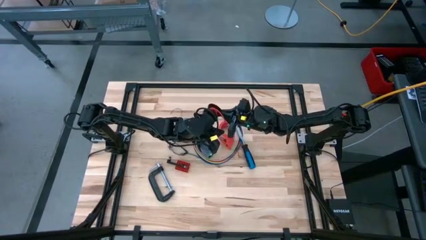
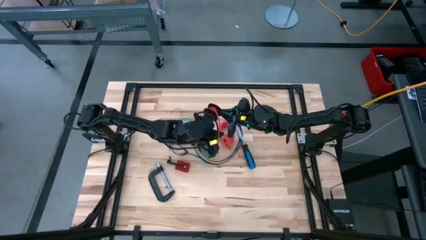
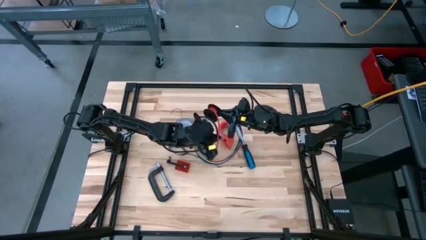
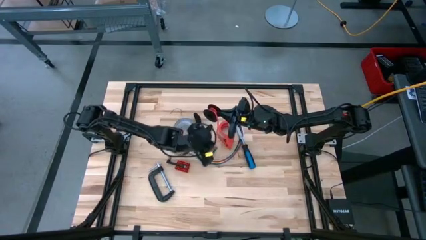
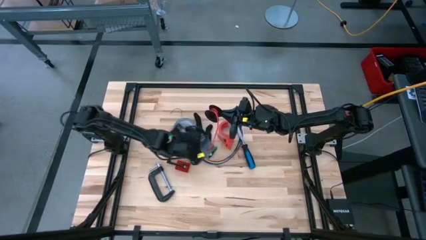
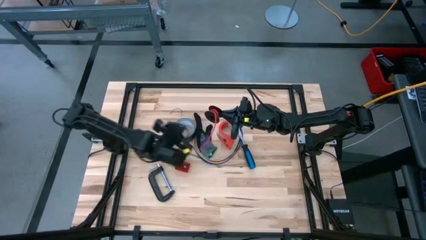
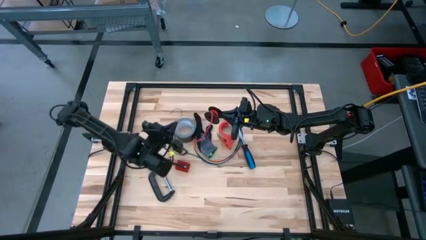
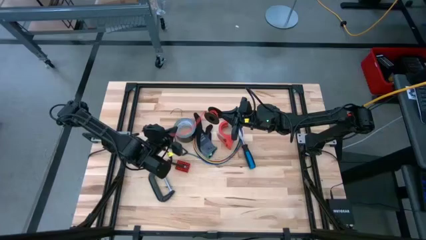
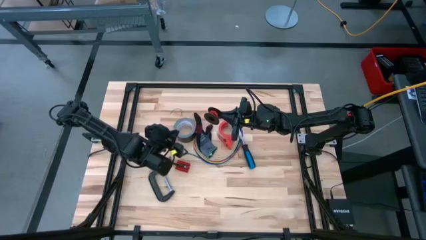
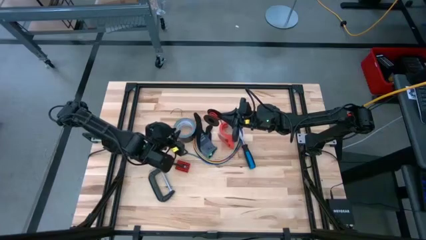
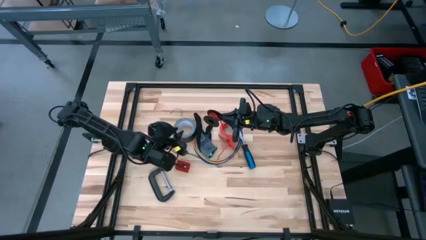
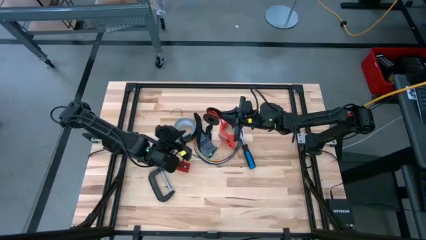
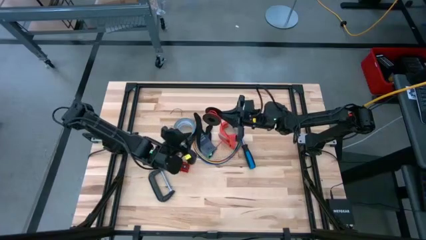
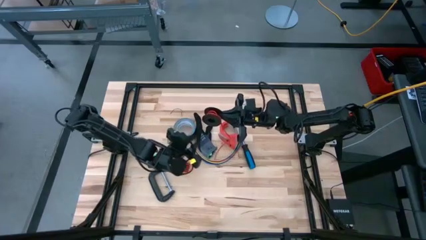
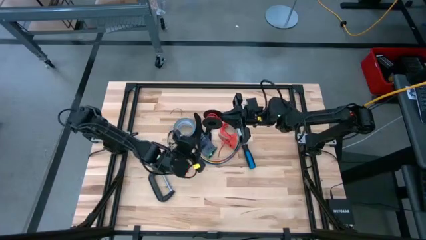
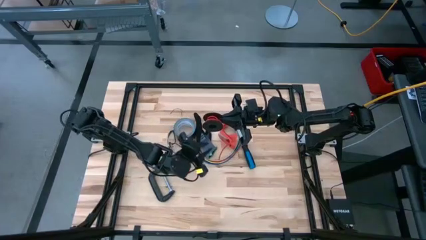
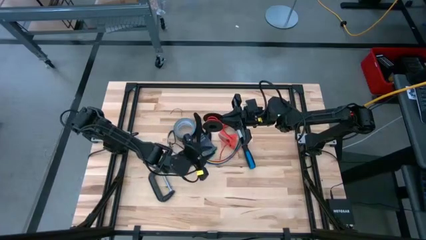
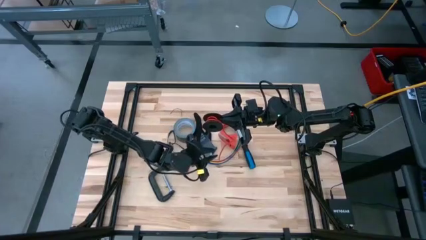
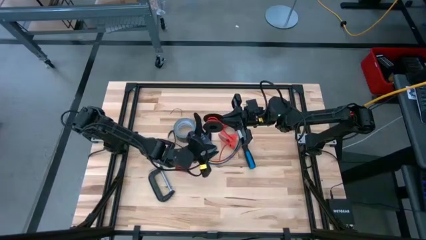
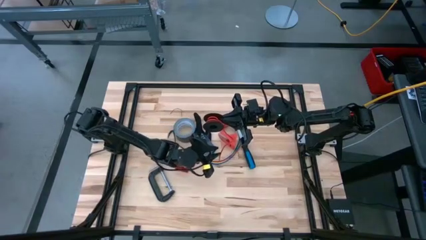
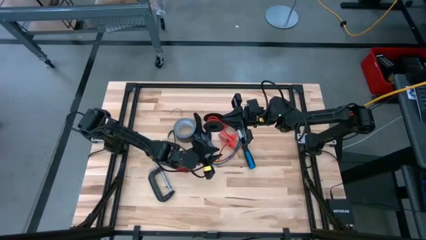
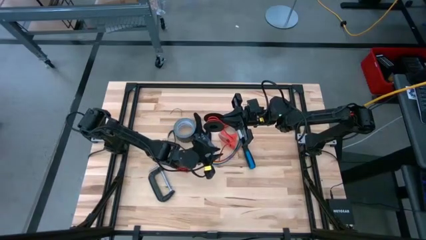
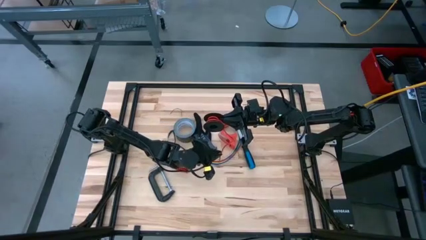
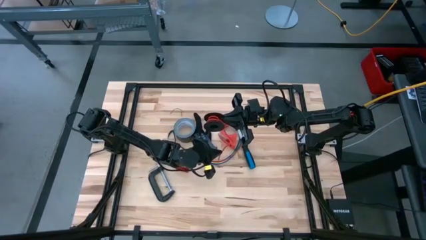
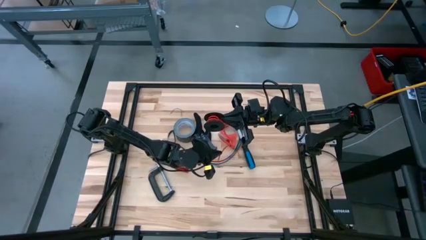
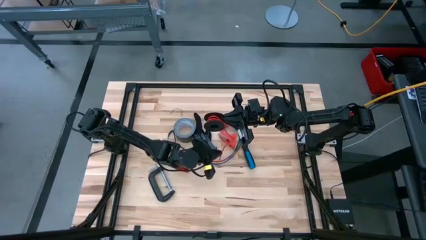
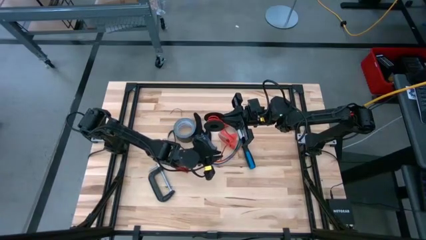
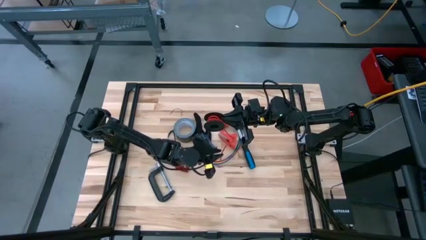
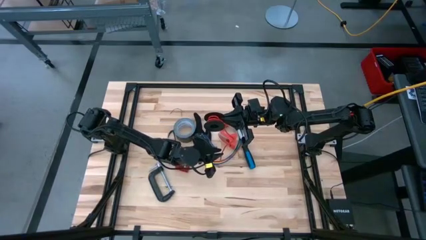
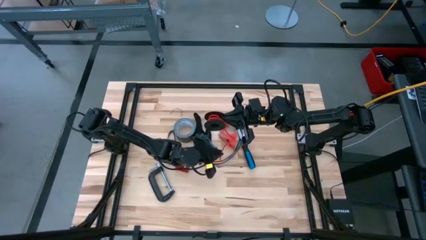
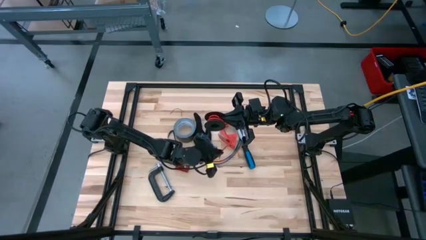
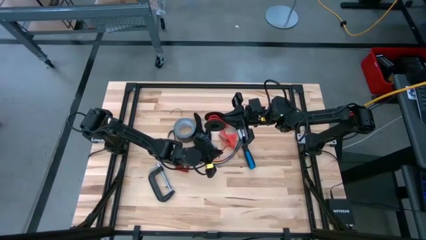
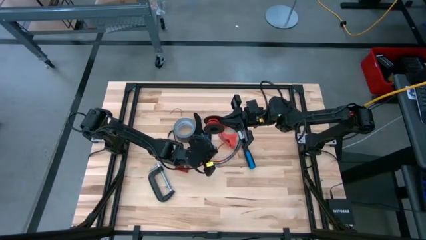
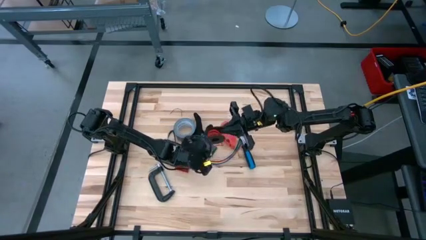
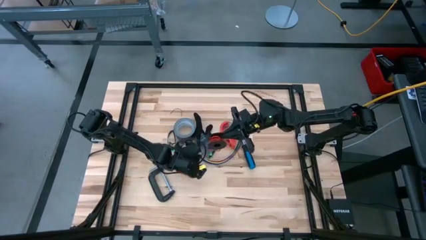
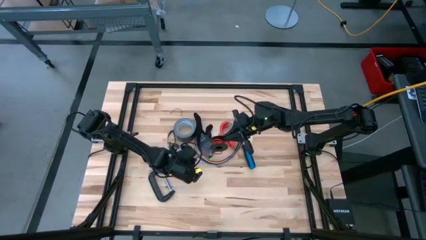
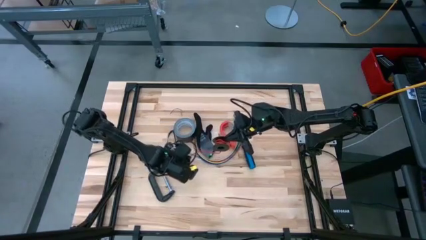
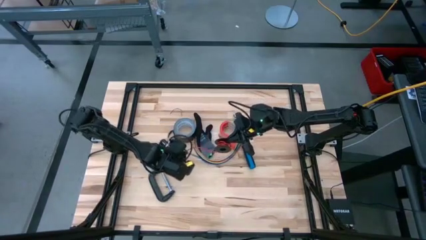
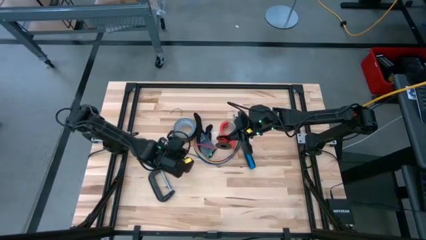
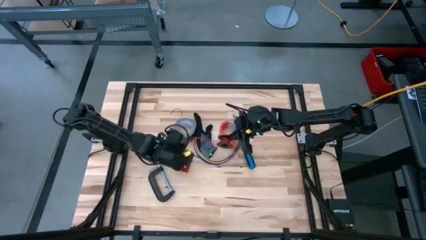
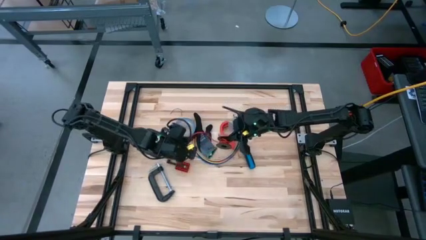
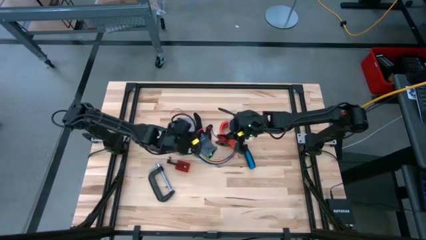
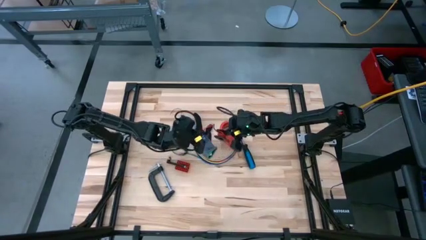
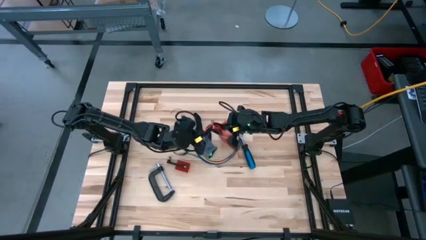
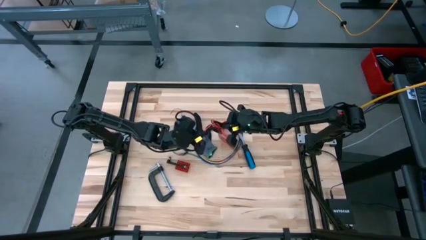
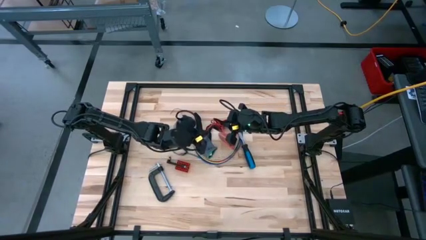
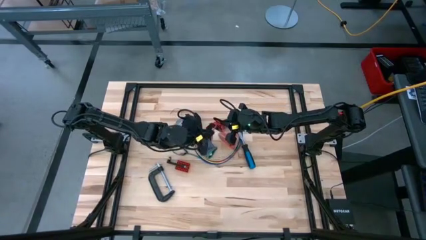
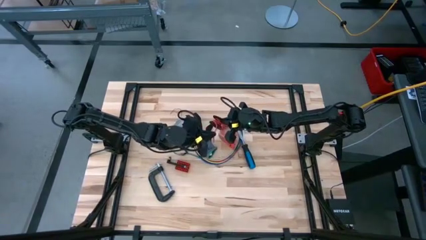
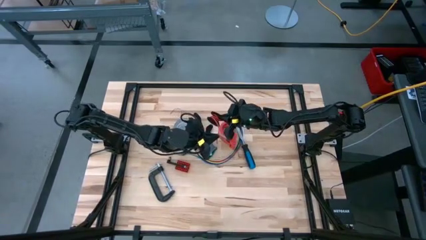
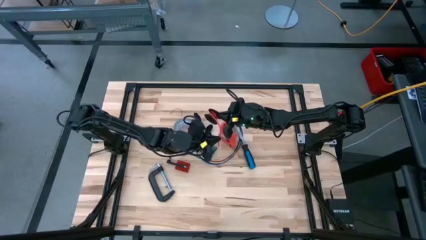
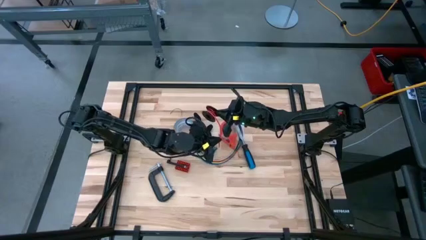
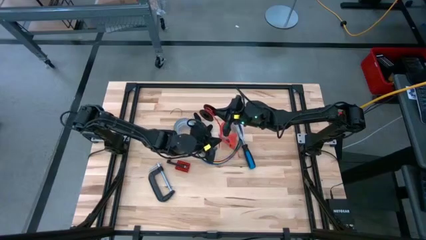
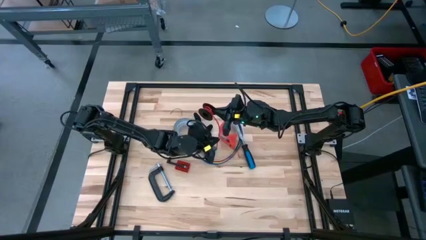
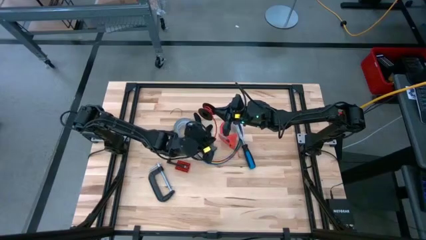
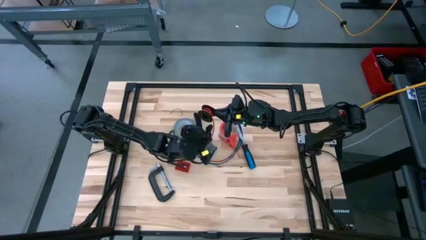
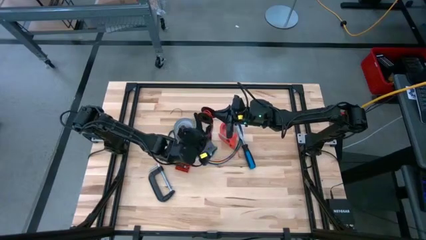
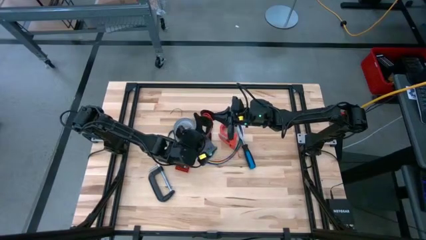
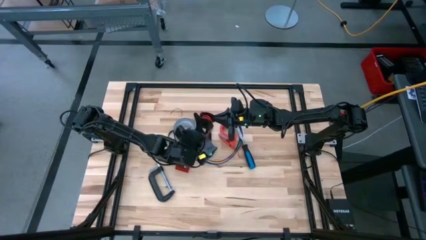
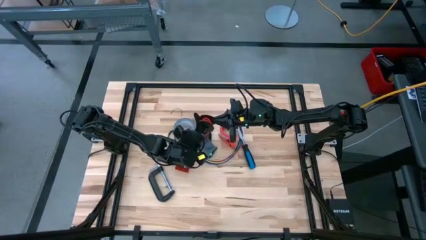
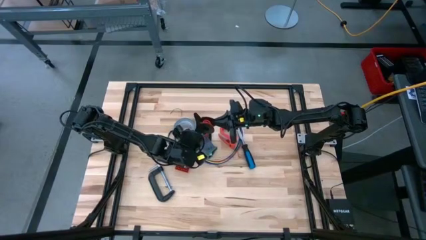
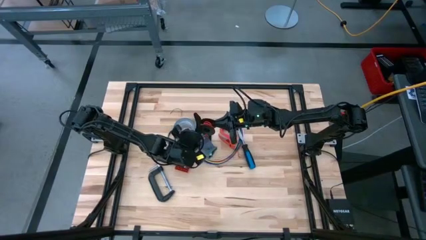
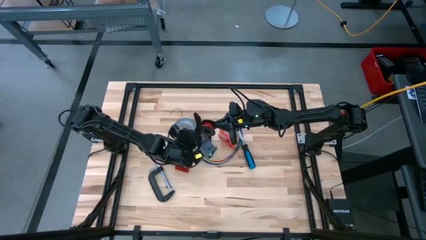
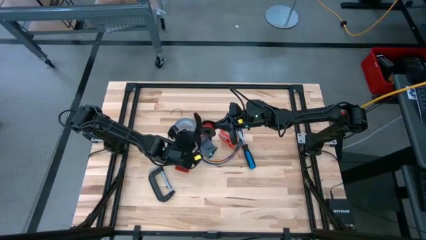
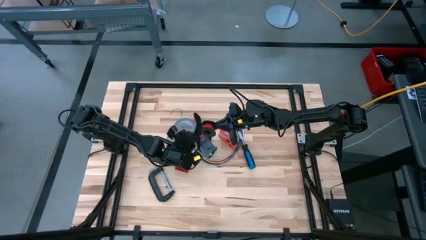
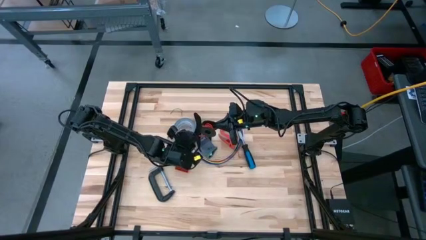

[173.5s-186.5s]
Task: Coil cords
Coil the red wire cable onto the black spool

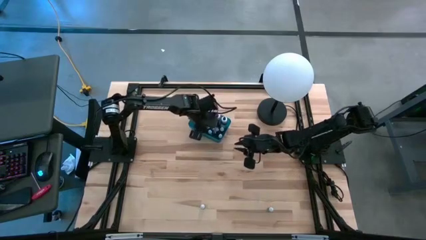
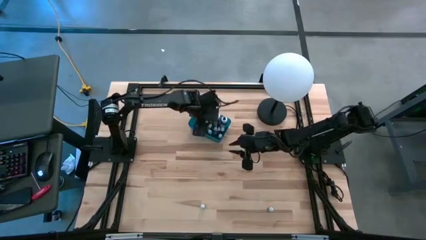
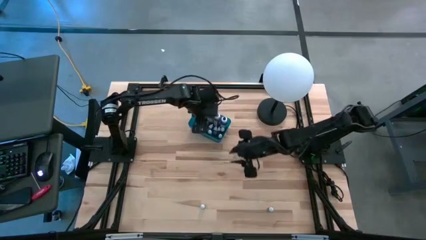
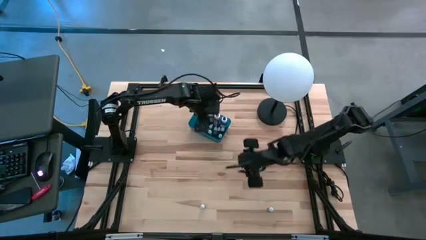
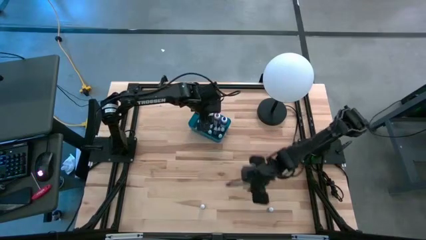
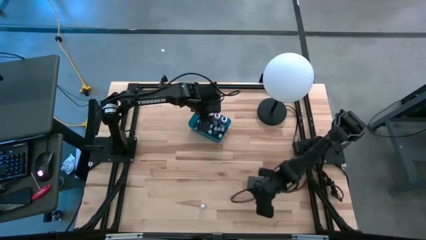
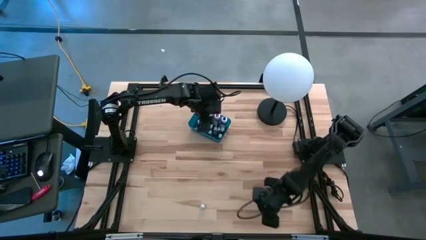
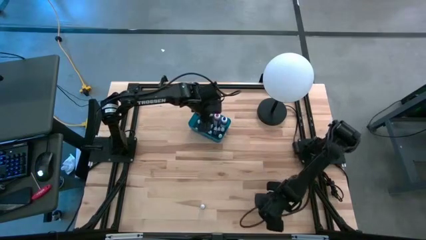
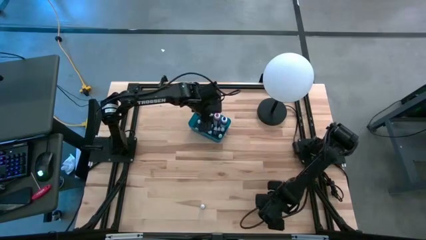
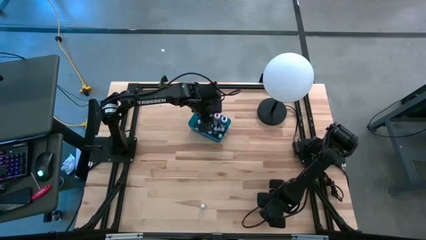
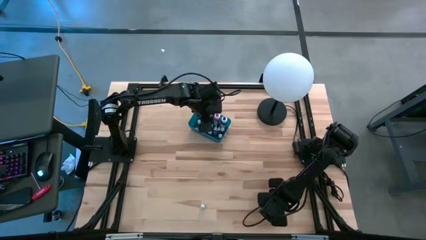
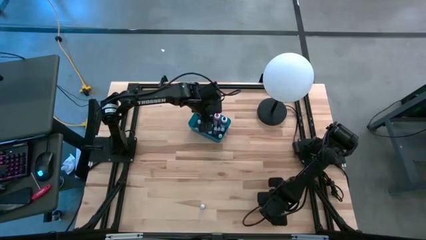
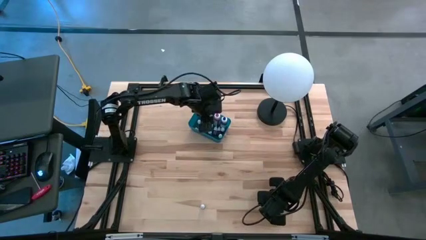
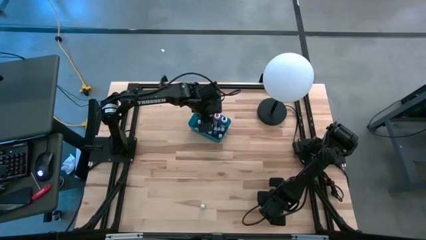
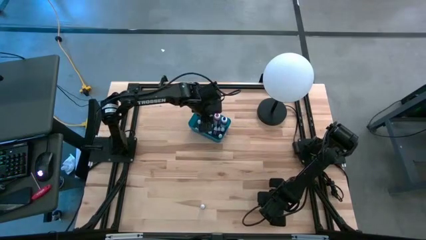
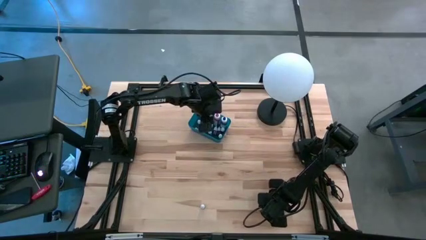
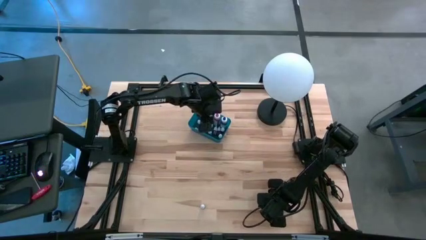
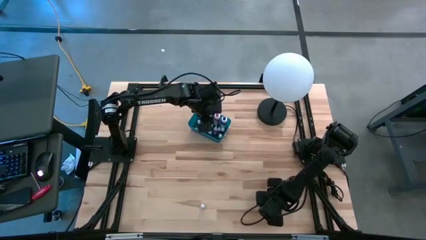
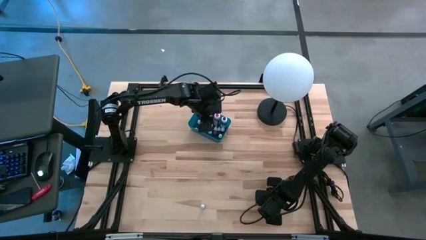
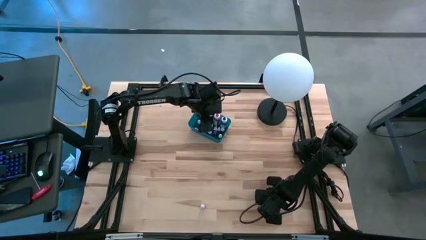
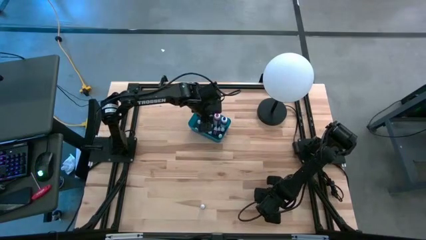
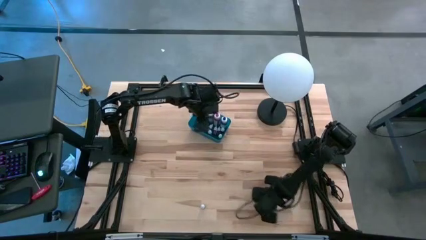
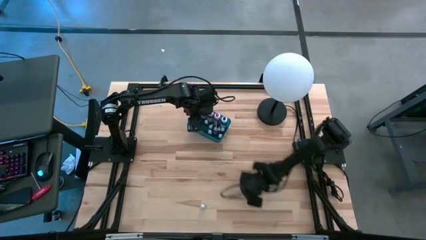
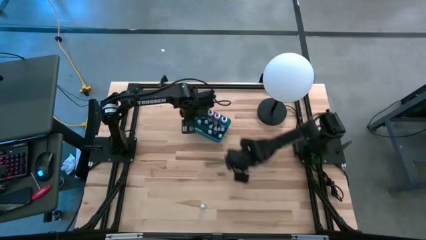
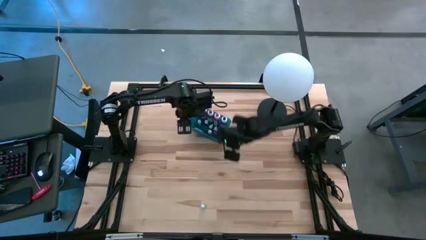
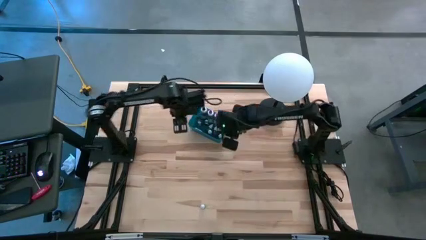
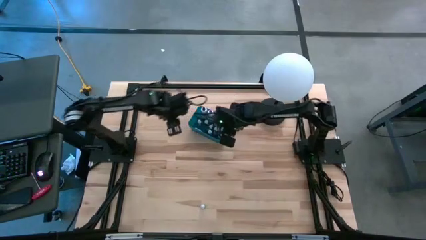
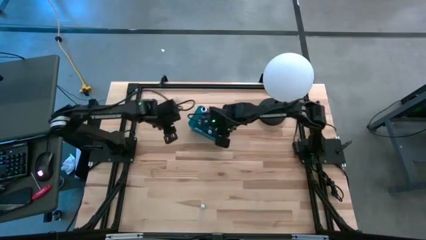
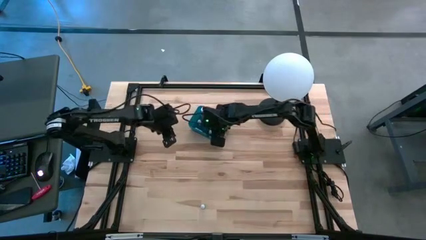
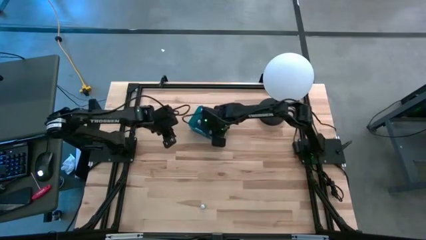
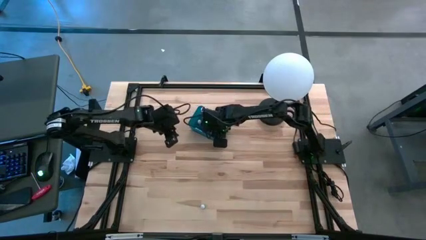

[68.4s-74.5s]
Task: Pick & Place food coloring
Put the small green food coloring bottle into the blue bin
